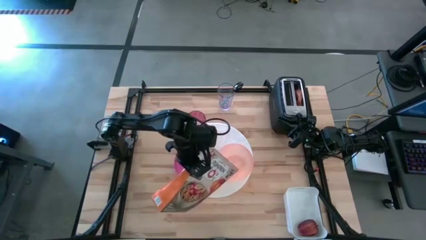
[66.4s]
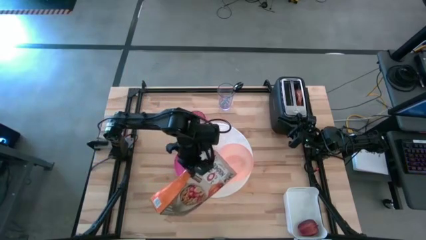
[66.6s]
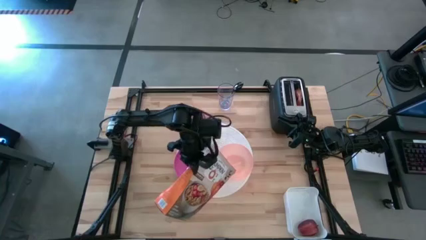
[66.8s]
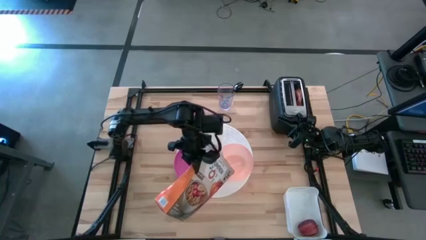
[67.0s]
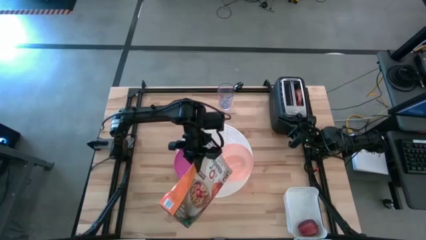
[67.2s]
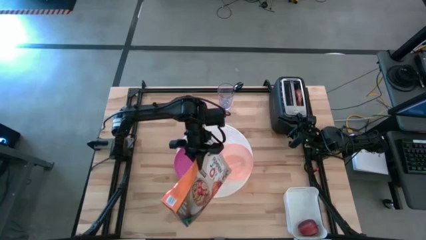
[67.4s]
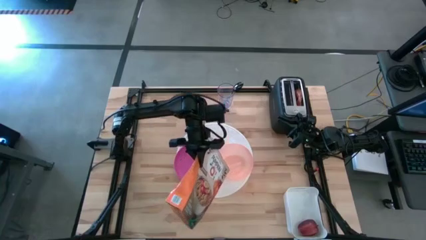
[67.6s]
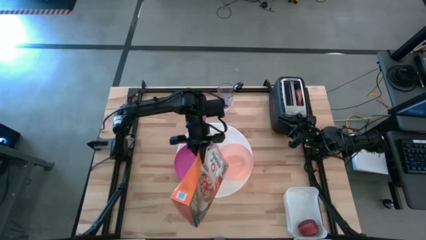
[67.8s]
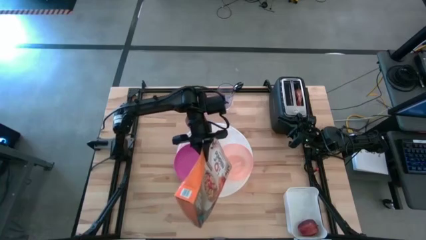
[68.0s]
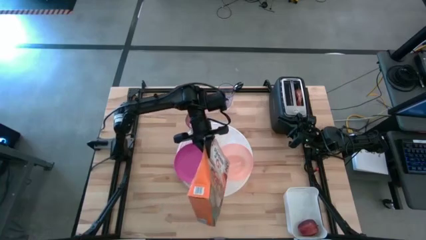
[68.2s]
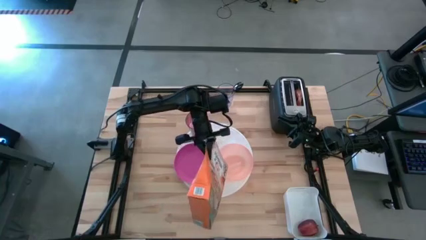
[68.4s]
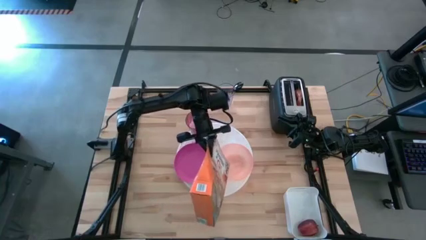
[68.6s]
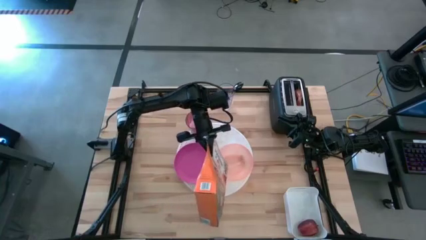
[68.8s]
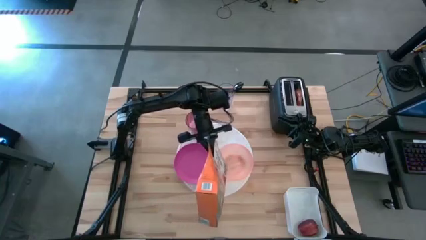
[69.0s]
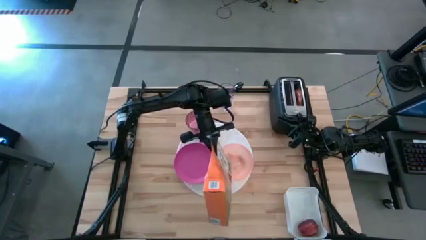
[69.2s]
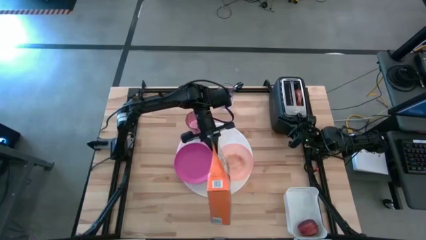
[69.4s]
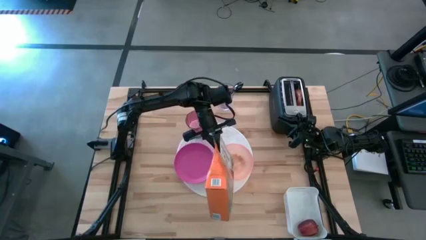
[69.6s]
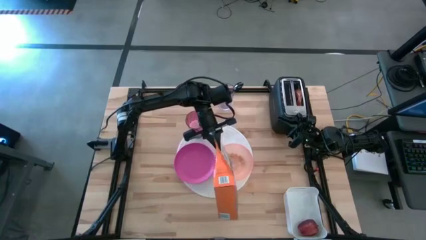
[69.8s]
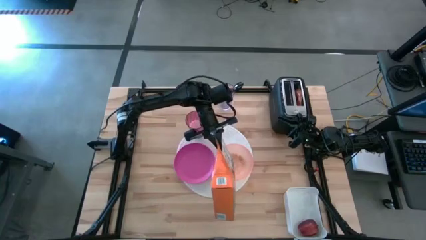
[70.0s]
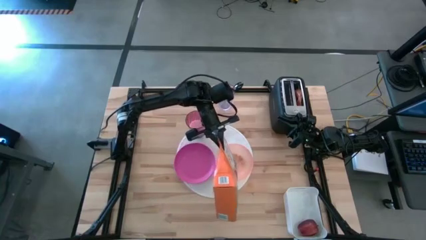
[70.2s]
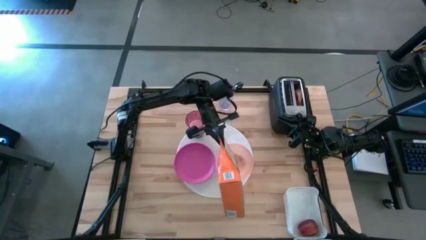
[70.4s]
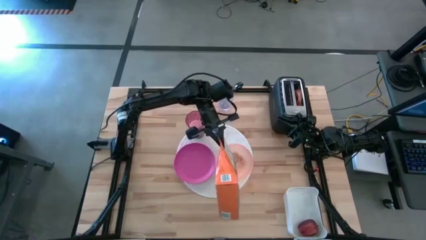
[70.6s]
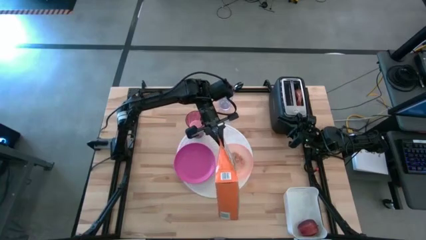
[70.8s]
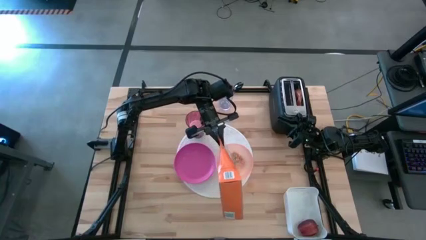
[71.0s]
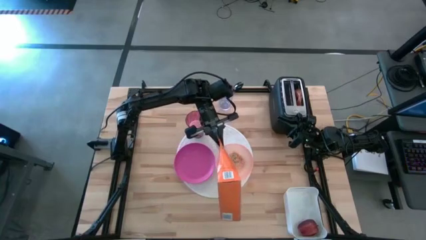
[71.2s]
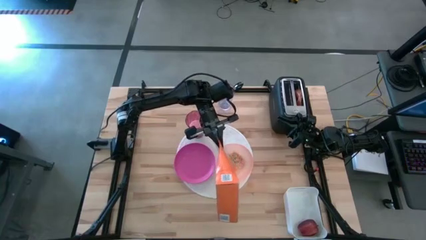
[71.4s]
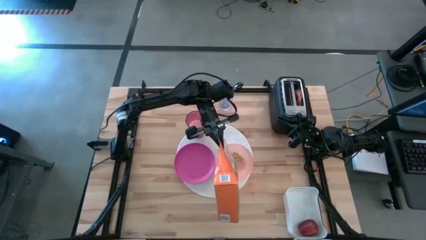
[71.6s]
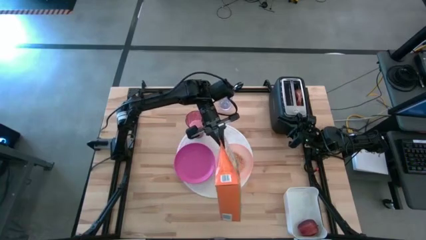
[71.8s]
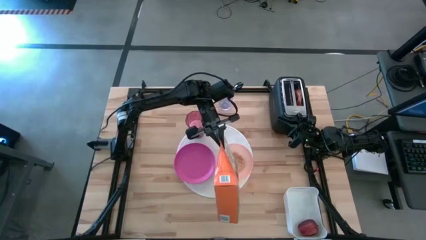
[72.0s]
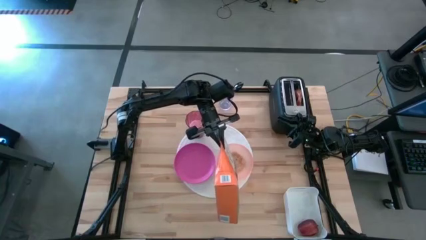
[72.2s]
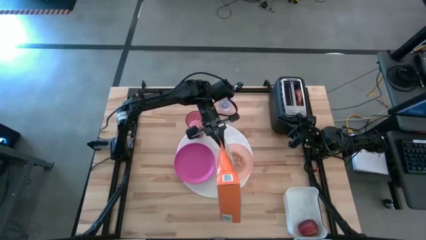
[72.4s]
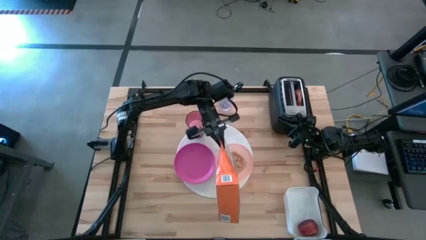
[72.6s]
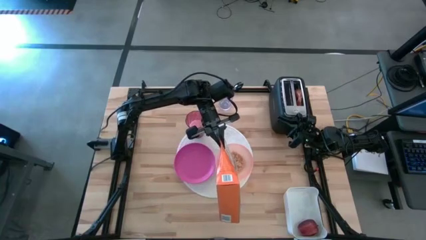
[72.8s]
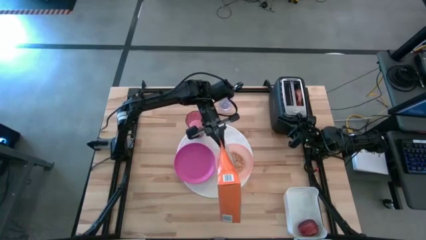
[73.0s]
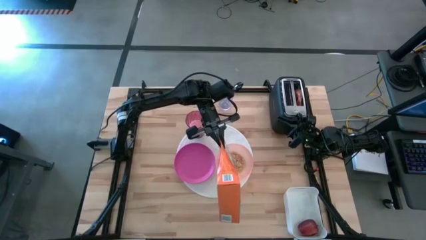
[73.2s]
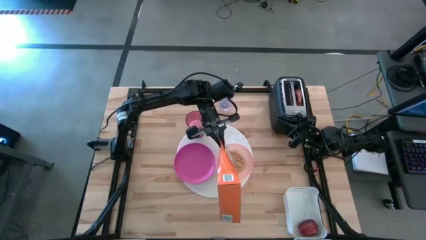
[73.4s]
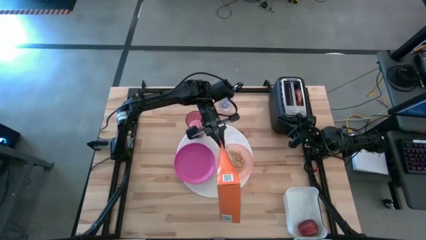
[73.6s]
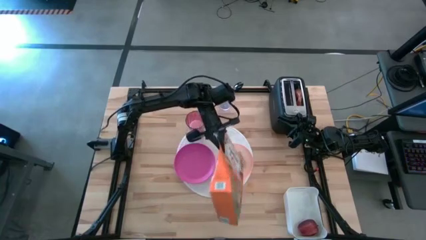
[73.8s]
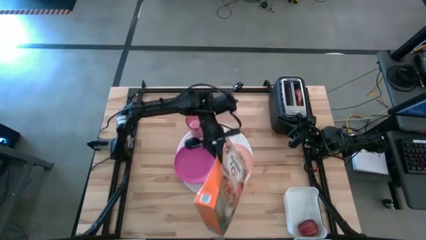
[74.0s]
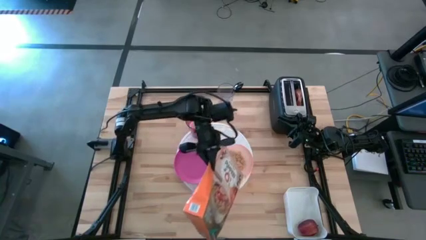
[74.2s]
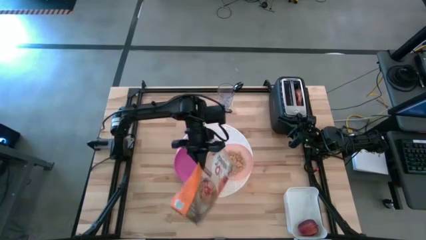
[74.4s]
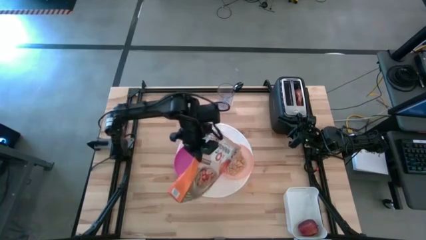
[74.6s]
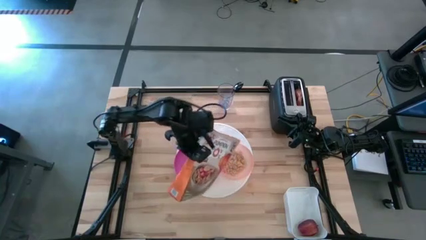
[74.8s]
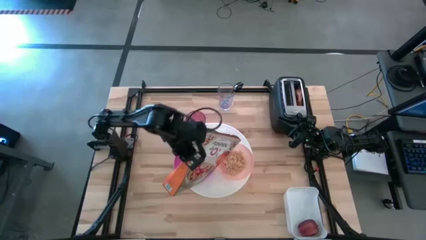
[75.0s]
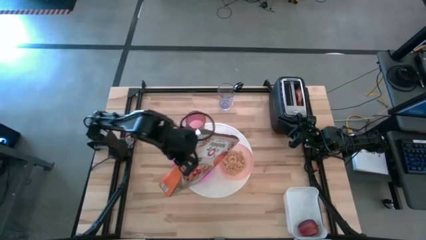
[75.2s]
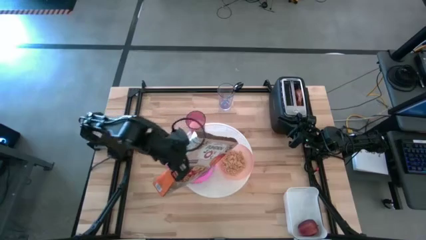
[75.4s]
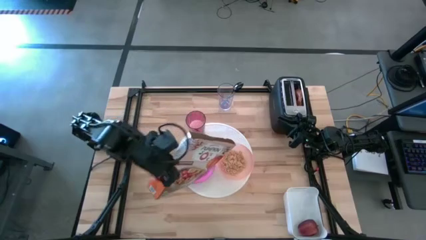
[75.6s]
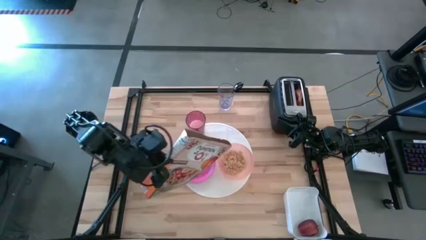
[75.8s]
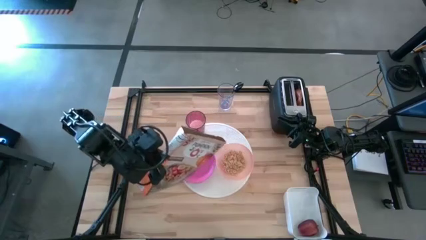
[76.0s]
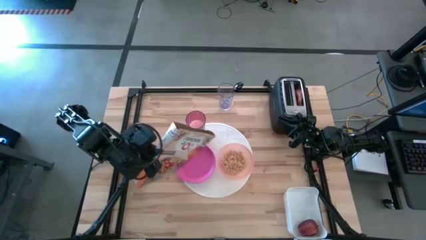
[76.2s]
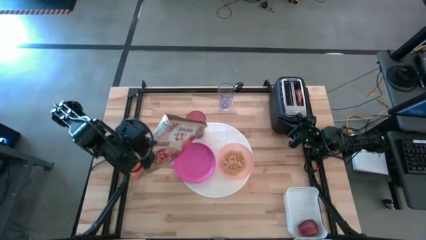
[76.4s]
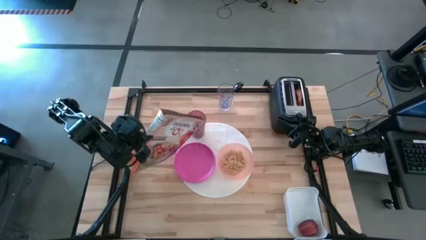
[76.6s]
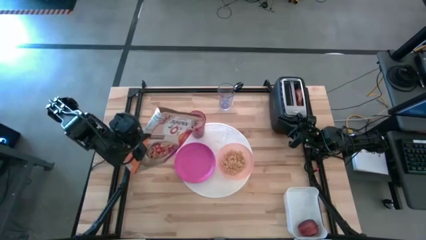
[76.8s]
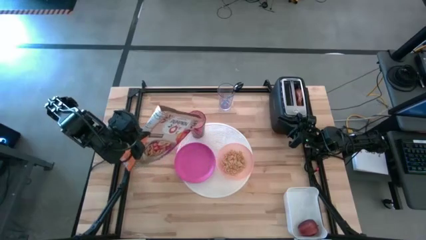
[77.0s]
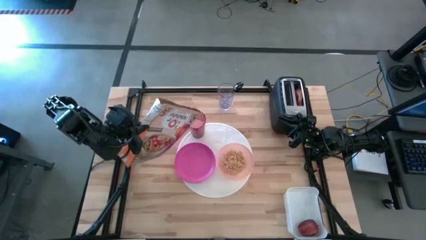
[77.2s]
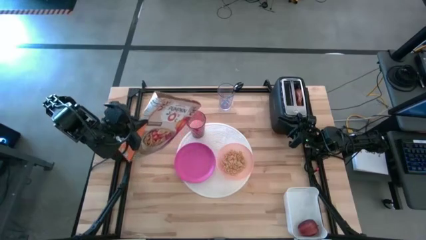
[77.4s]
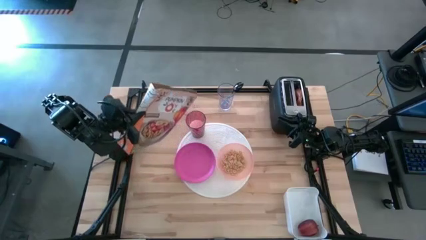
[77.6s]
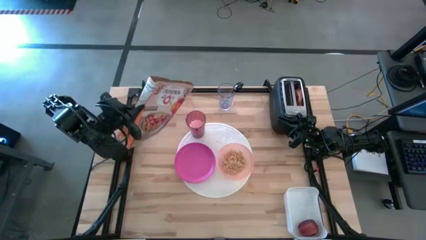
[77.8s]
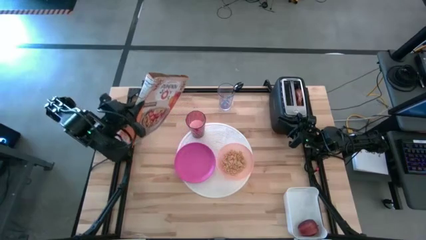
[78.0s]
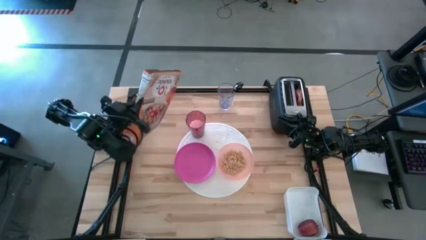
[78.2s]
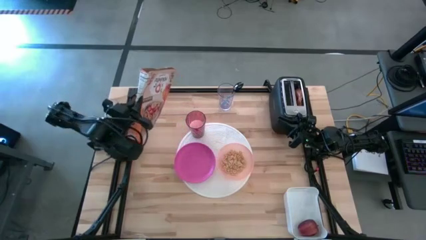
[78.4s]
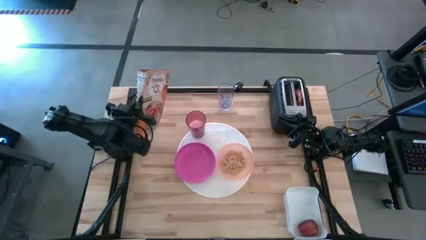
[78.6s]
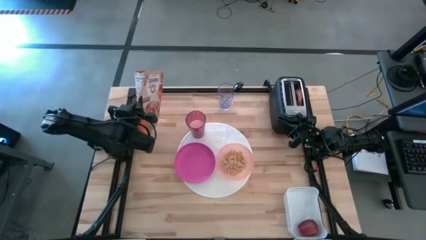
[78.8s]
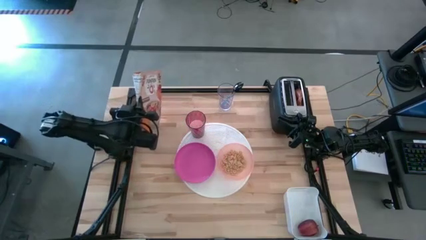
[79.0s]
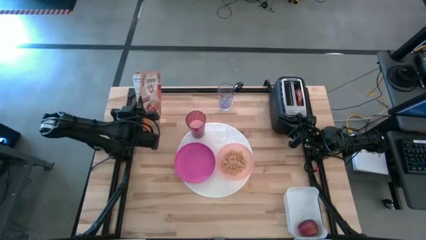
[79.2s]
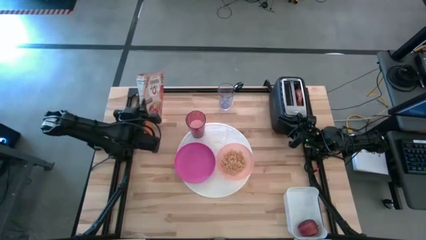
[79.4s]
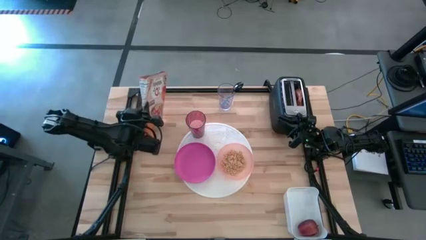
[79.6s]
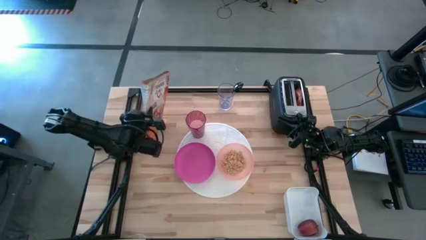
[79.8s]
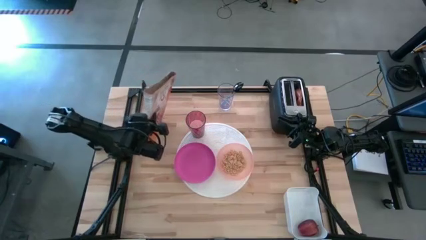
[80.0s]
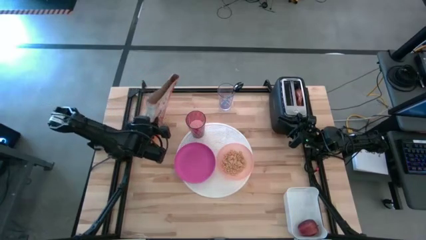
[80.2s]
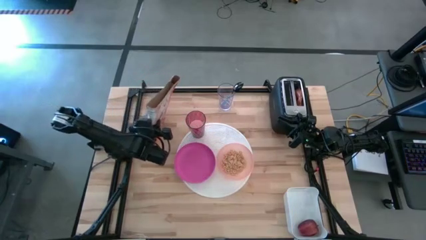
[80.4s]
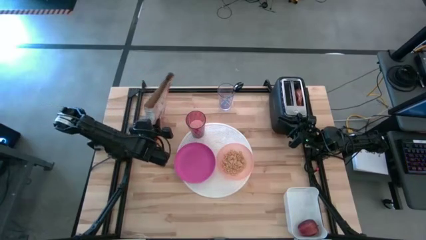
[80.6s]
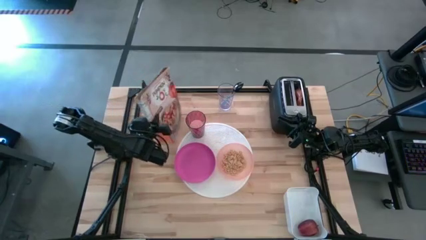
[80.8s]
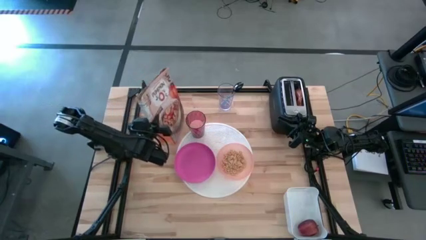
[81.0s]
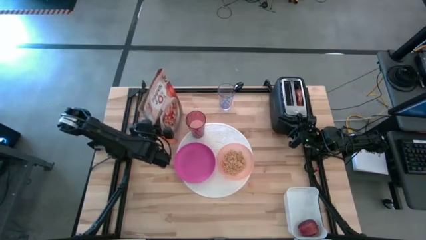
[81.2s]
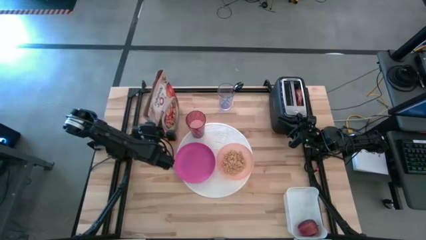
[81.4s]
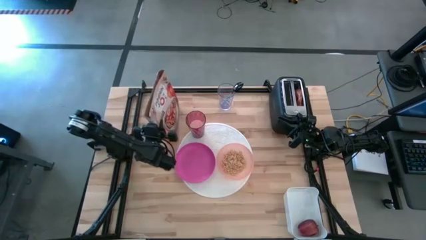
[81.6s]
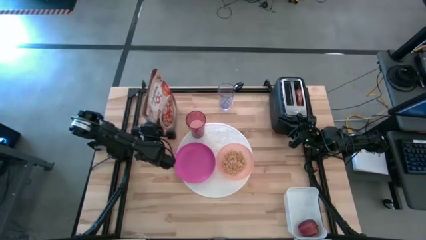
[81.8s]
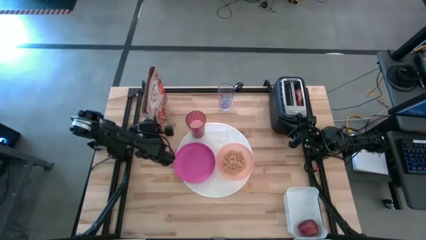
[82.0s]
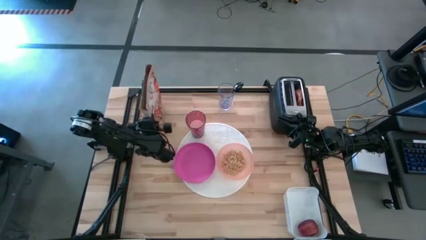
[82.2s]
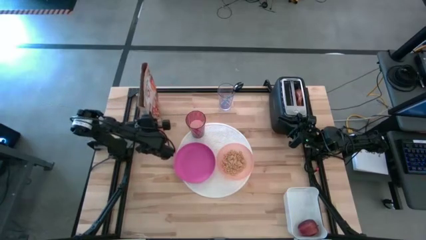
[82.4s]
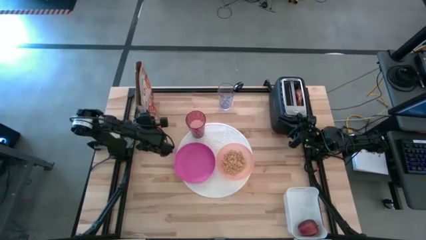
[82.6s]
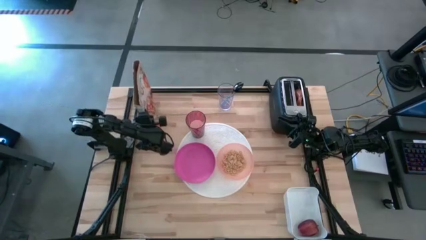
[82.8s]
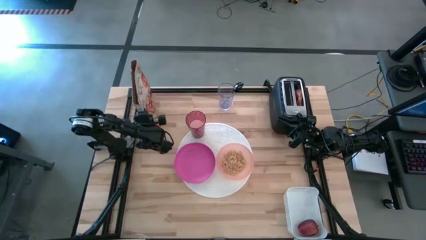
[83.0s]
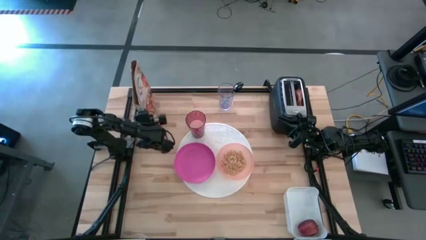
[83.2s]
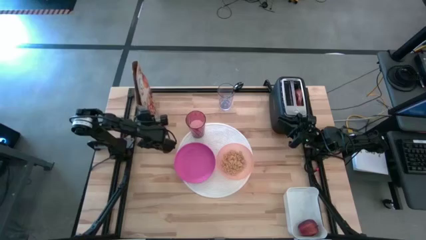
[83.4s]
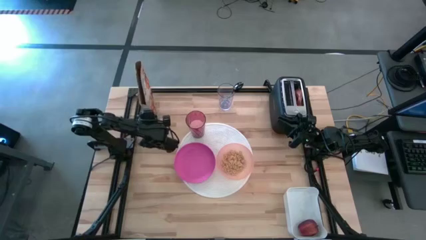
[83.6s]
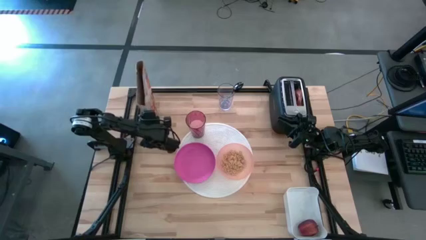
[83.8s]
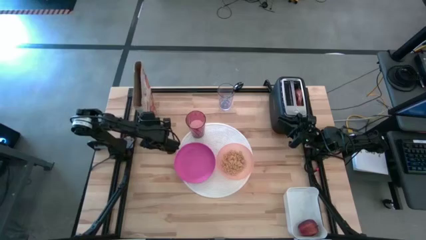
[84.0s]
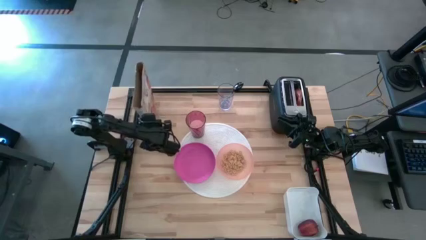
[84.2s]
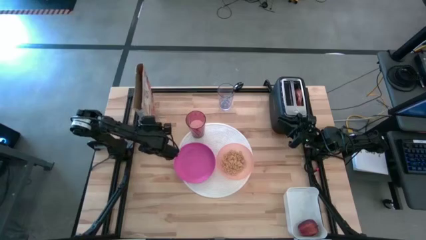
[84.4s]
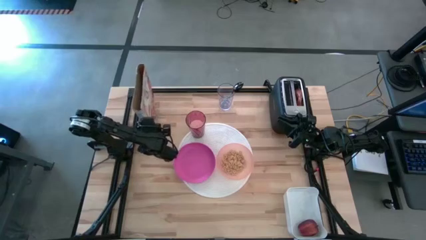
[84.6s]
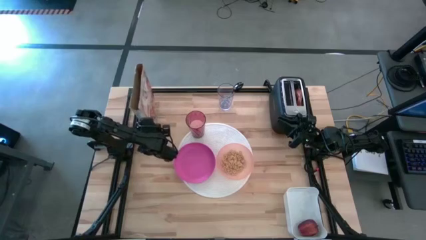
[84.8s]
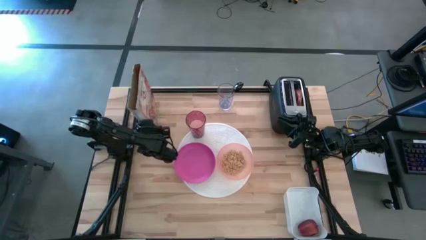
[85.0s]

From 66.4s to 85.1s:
Task: Arrange a breakfast setting
Pour the cereal into the orange bowl
